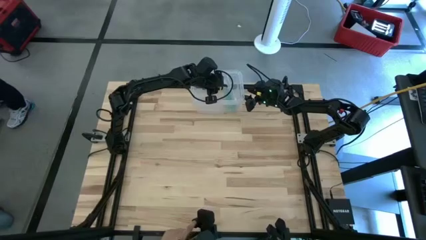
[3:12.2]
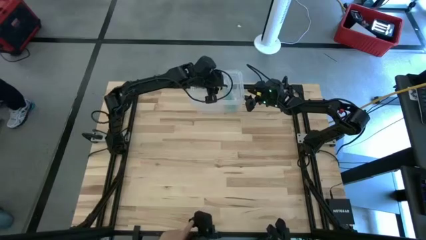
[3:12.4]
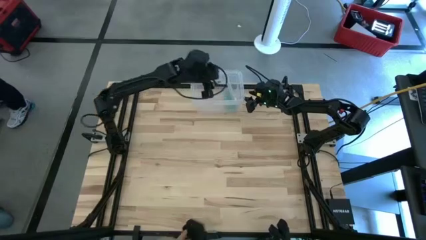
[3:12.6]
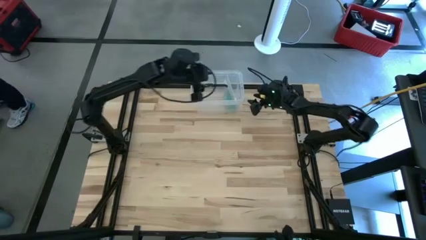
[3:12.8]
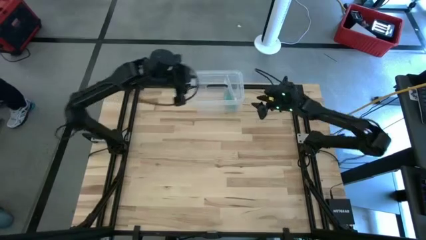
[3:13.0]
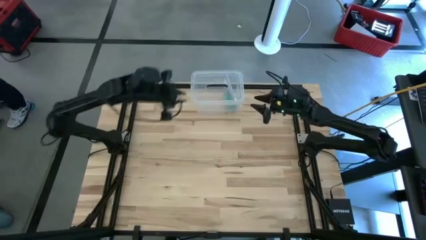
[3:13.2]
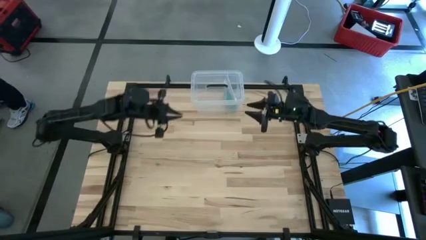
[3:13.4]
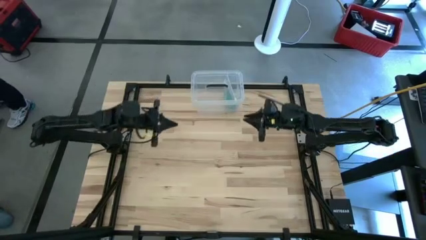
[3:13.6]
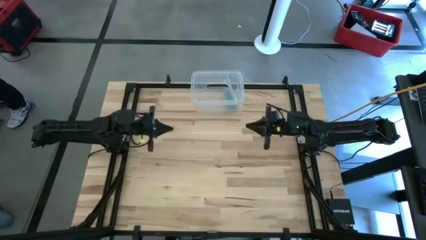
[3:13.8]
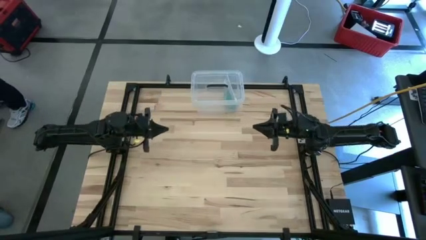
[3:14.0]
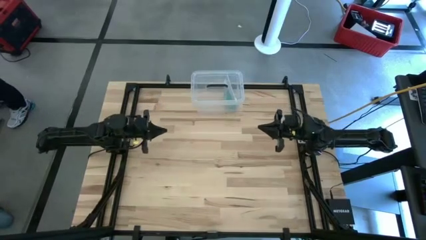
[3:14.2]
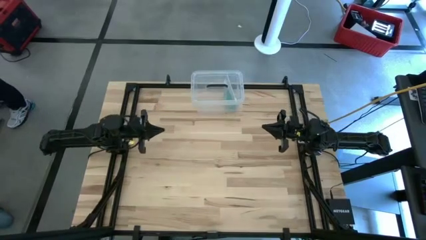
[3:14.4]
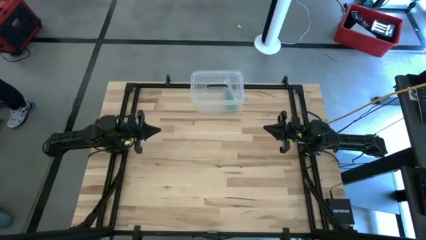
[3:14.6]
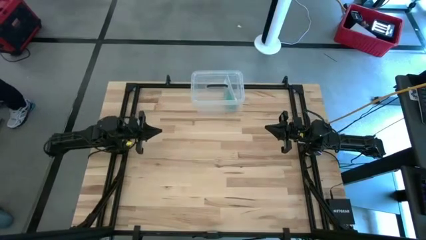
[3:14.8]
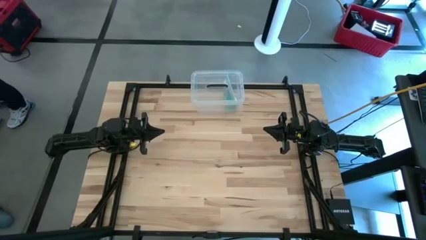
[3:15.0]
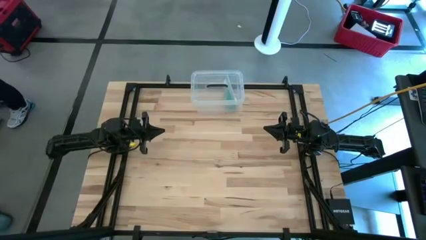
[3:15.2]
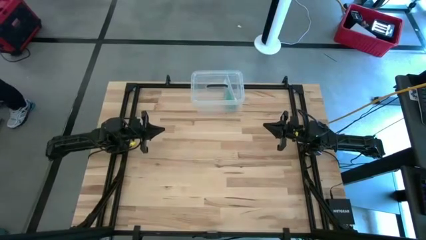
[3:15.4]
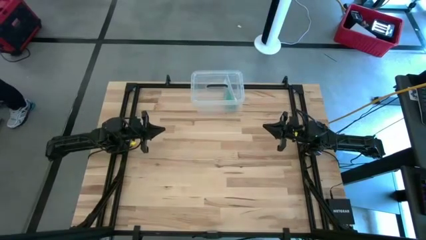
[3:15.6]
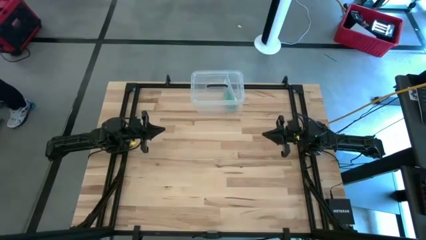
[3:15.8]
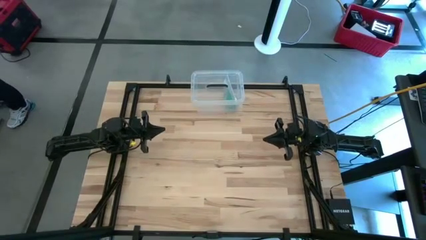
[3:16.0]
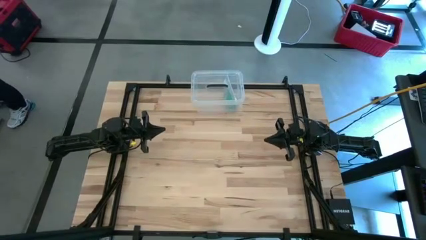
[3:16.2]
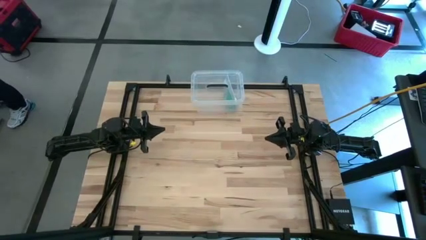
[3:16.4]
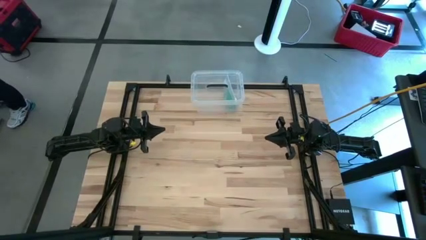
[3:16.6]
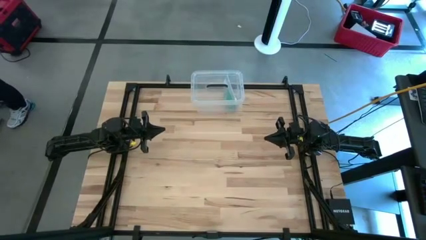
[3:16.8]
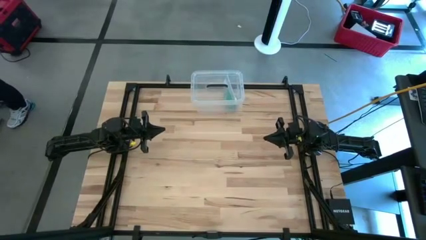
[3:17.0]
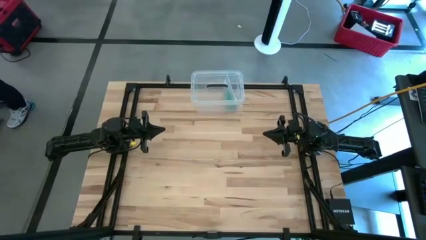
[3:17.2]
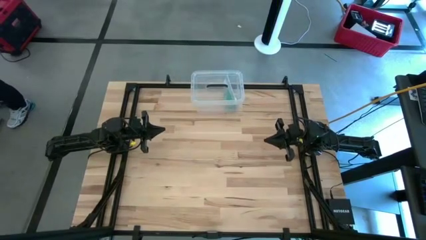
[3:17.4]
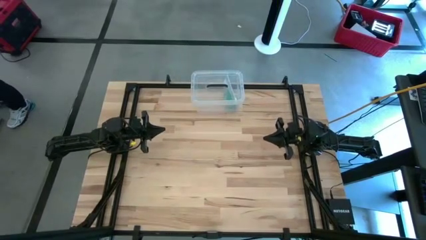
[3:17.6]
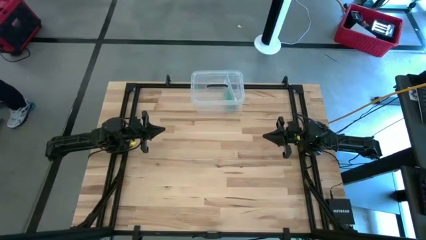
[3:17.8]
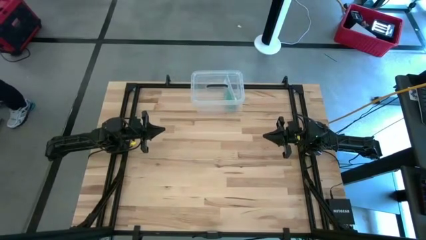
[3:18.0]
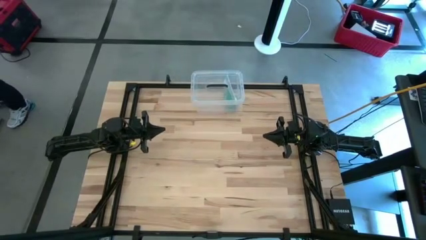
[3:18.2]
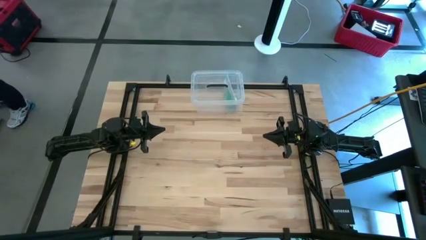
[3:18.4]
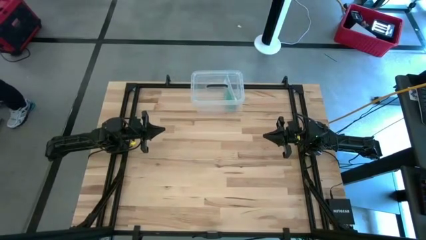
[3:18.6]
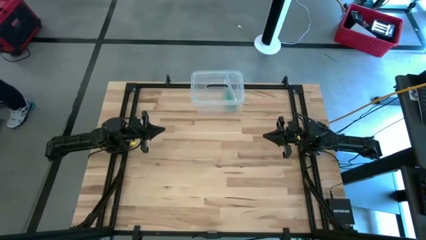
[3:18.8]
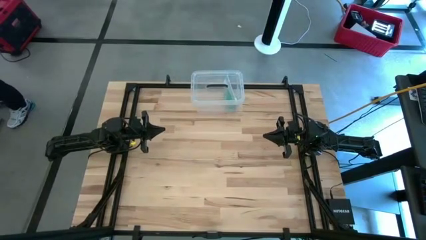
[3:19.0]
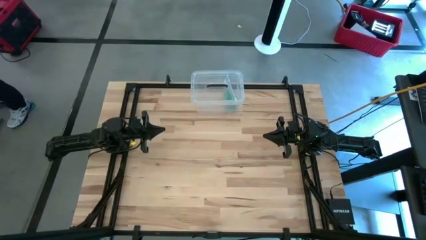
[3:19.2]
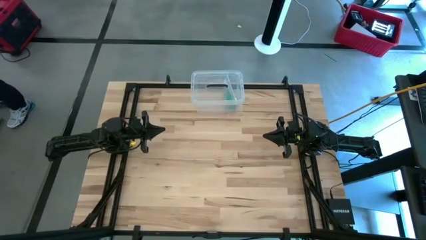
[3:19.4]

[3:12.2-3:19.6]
Task: Roll bandage
Return to Home Position

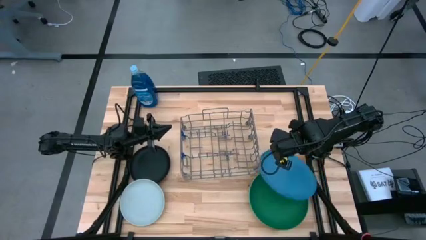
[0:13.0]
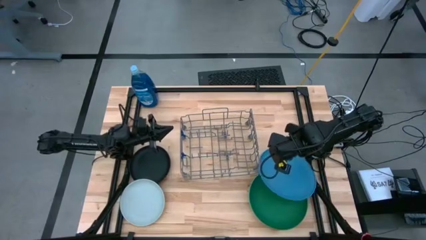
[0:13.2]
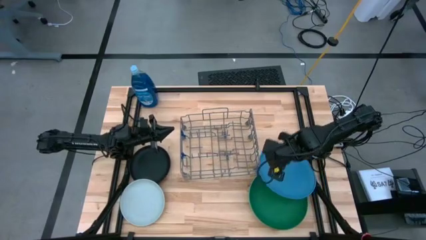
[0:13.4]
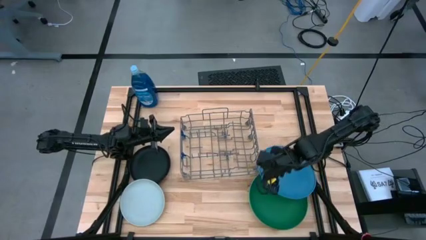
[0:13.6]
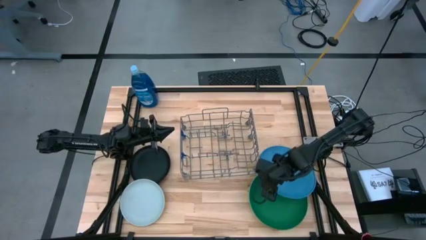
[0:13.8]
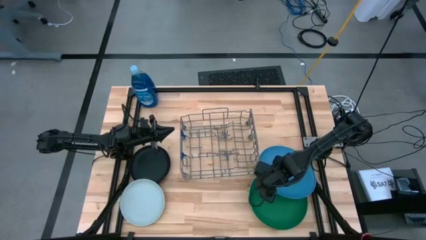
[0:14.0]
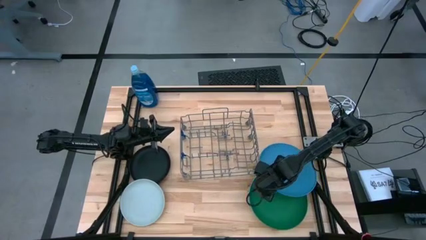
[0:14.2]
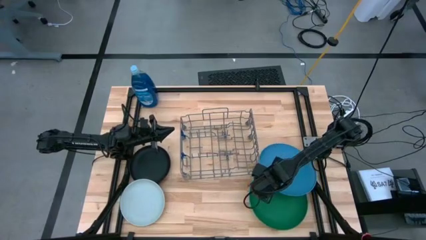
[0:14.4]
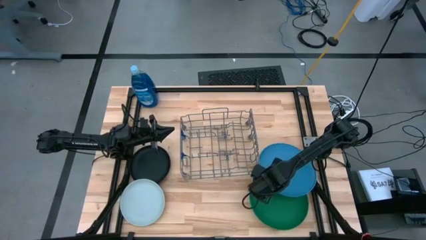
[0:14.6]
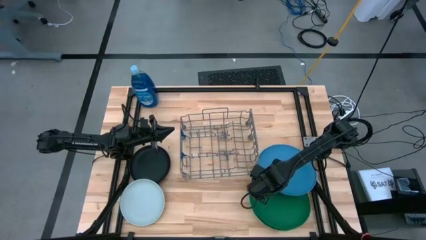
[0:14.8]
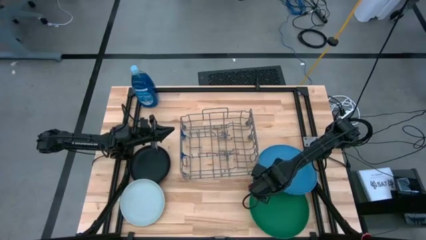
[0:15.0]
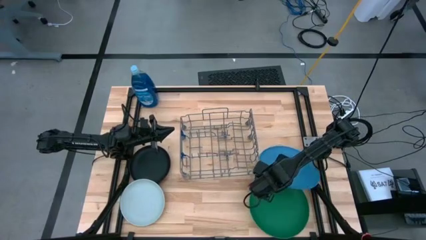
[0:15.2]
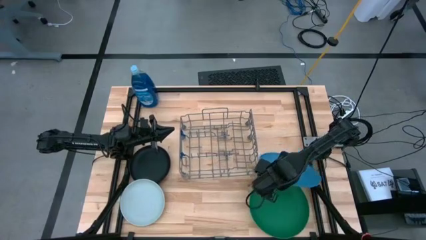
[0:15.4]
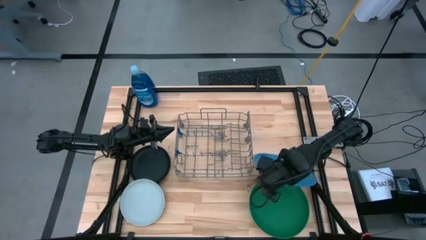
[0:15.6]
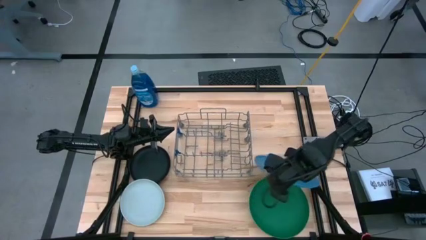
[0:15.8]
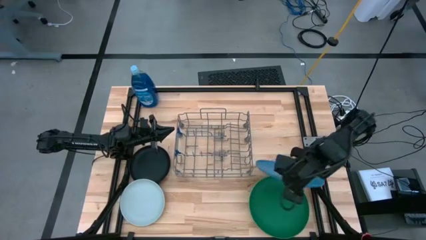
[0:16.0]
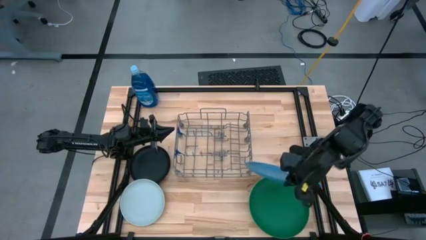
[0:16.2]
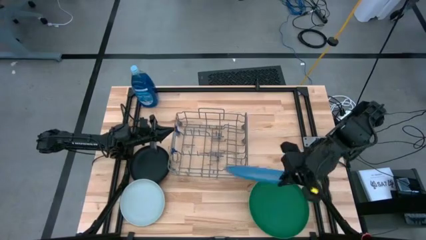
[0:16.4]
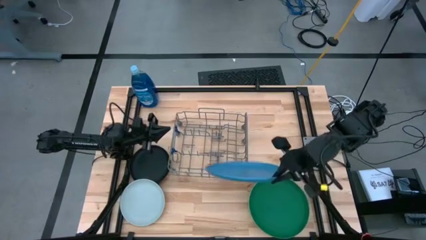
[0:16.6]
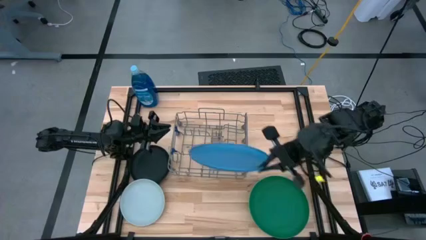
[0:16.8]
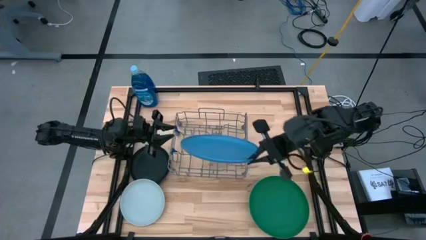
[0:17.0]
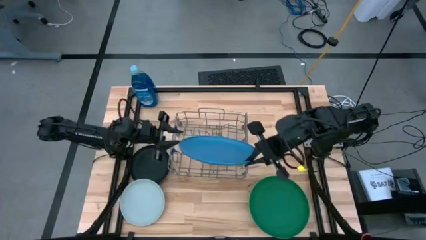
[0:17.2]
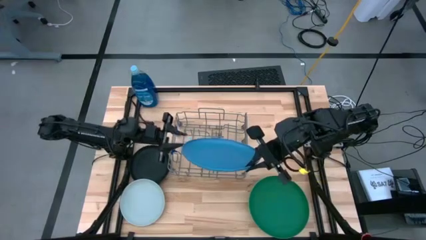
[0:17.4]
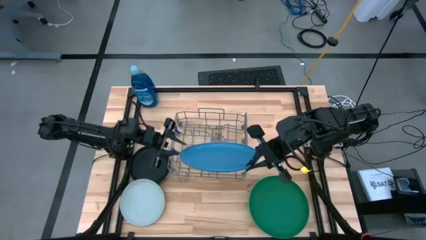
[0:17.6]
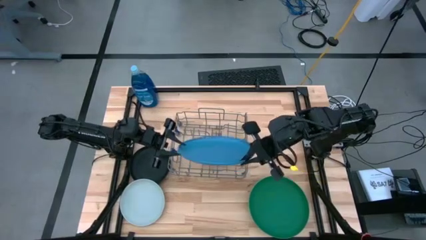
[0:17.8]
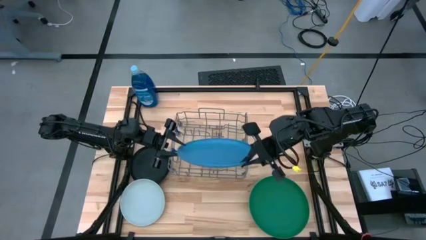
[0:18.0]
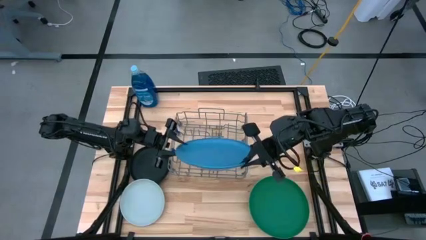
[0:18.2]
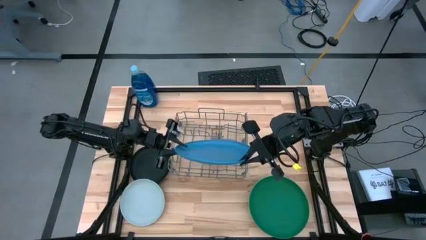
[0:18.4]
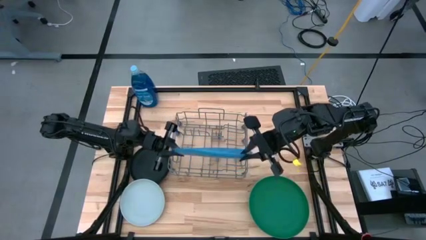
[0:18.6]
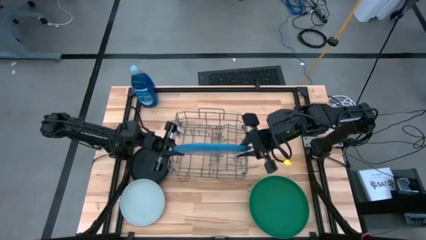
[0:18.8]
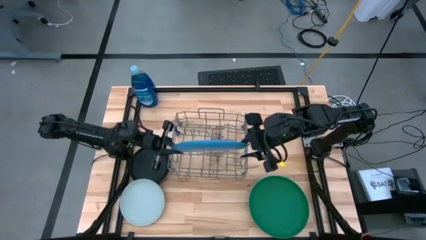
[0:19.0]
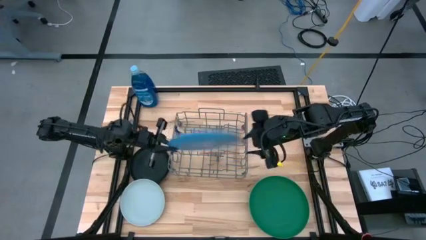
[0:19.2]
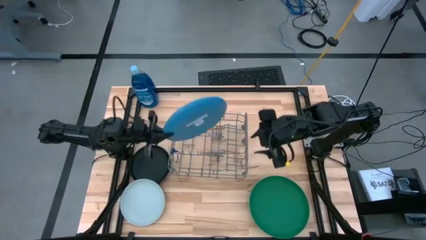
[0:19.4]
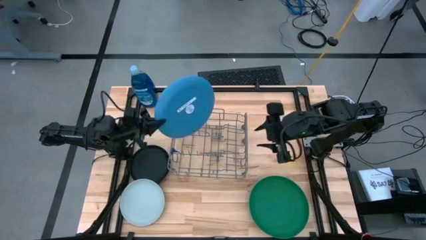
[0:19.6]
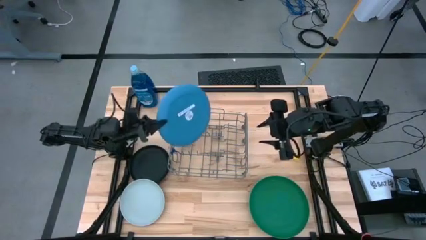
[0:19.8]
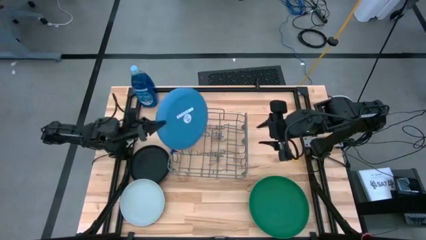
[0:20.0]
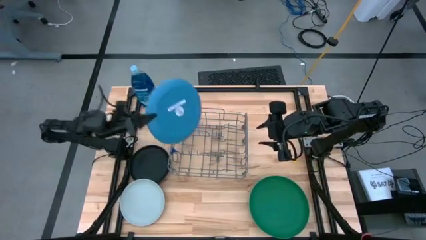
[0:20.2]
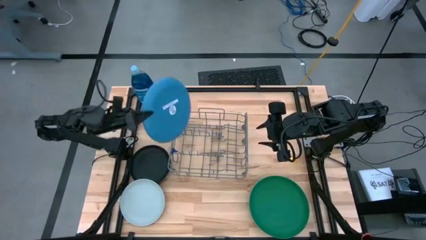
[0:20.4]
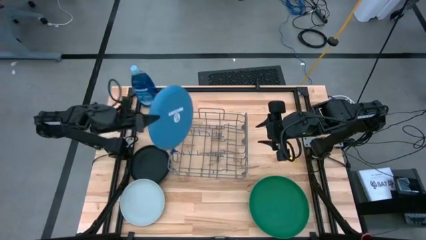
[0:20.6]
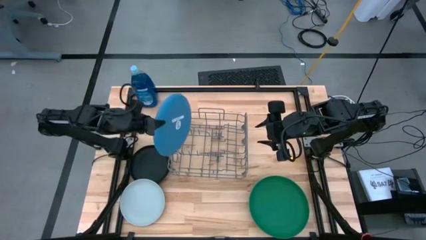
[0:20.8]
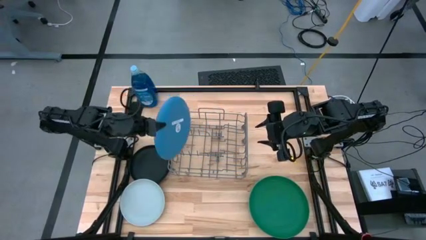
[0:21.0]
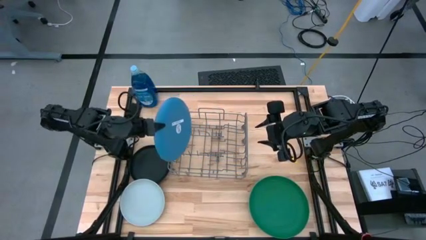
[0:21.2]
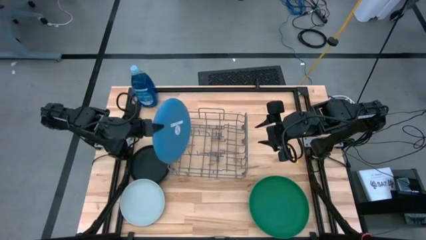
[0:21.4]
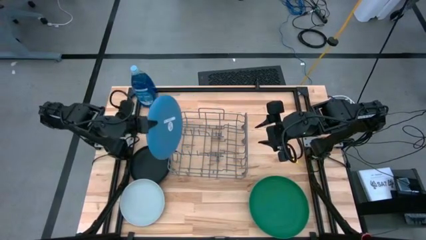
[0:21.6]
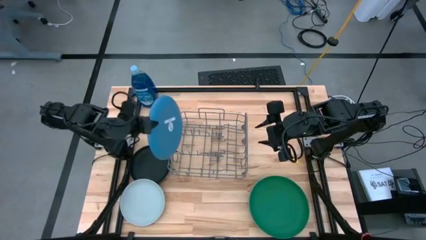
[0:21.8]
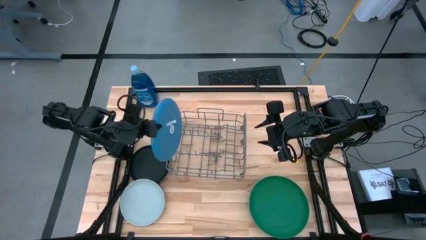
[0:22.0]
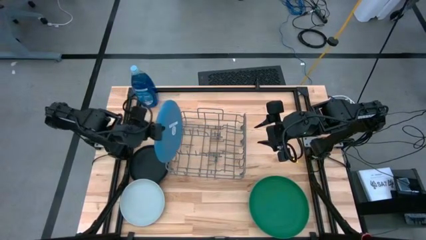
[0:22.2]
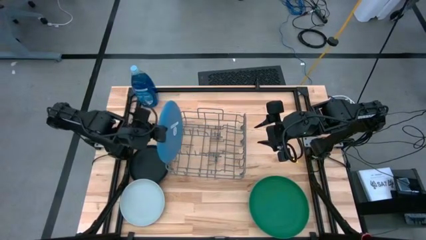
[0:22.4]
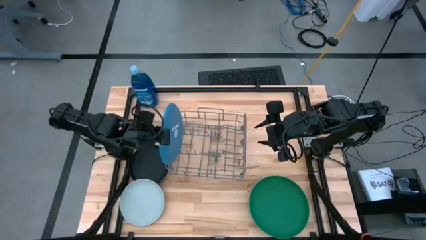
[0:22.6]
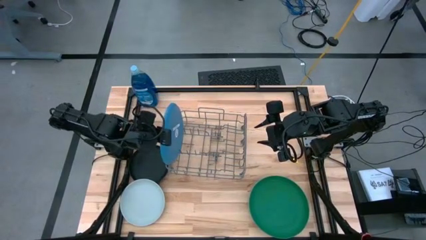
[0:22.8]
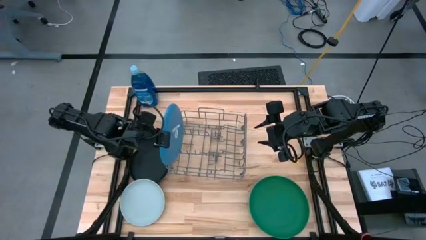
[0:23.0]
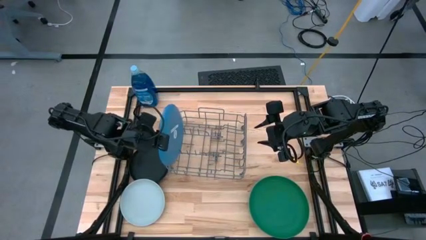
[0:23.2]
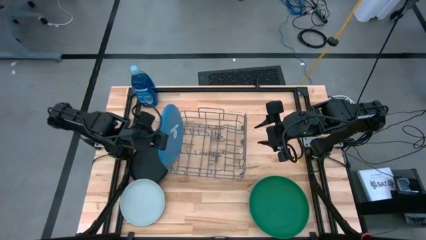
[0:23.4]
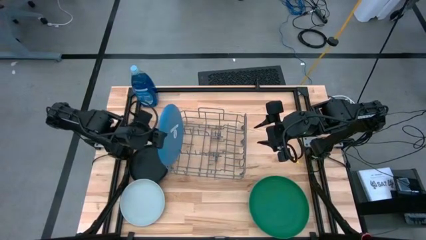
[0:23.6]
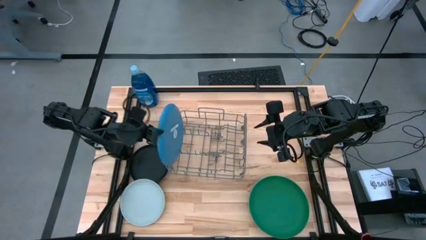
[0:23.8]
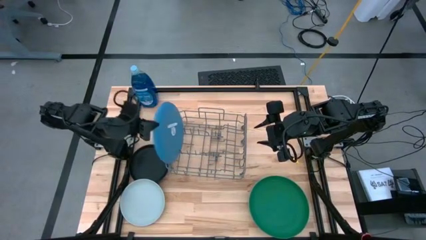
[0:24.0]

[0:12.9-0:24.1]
Task: Sort dishes
Put the blue plate into the gray dish rack
